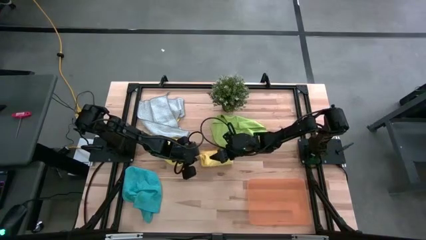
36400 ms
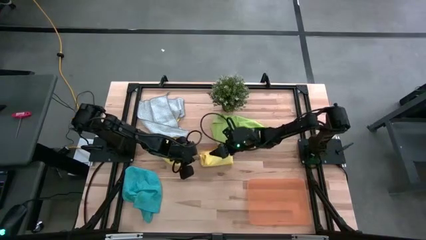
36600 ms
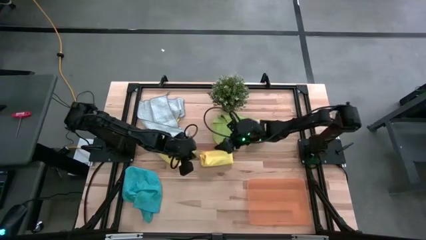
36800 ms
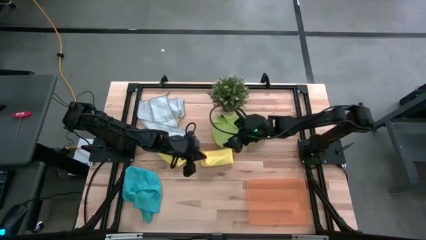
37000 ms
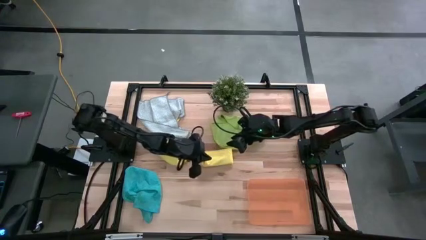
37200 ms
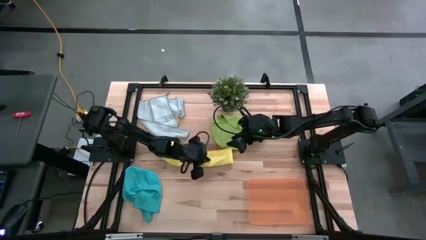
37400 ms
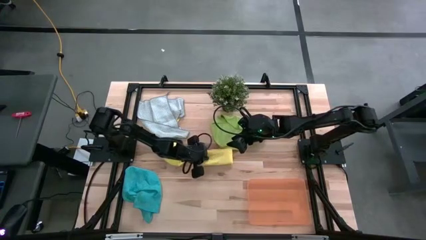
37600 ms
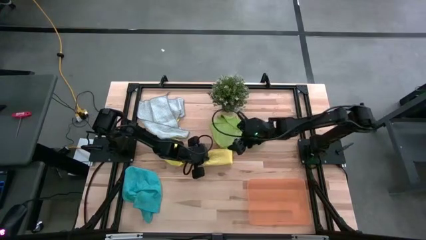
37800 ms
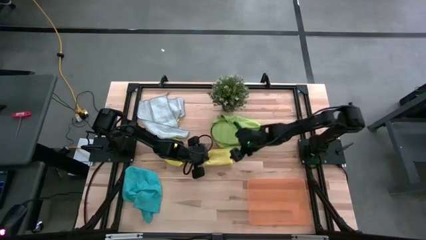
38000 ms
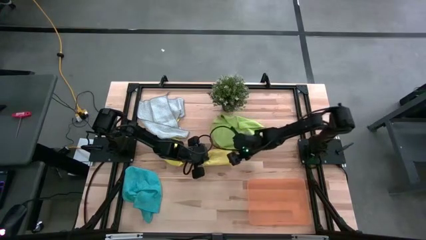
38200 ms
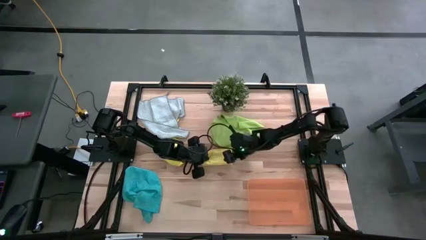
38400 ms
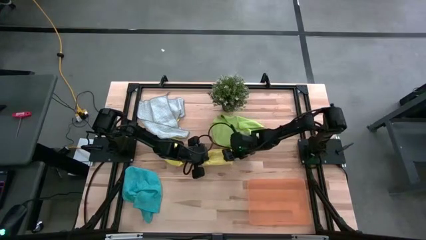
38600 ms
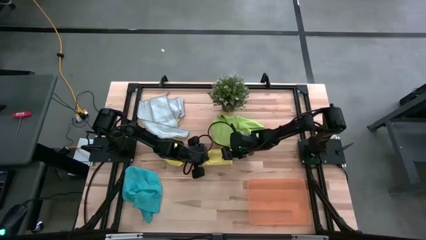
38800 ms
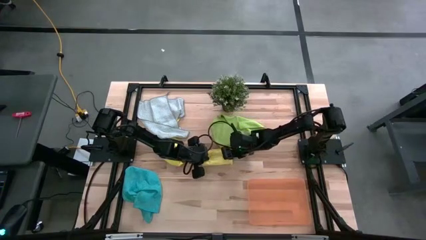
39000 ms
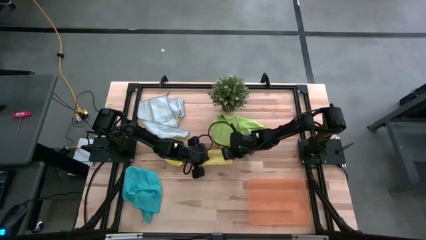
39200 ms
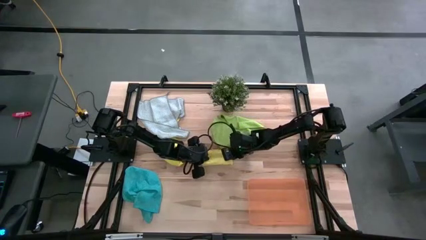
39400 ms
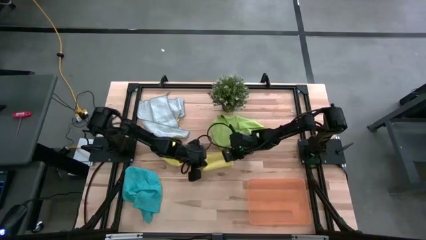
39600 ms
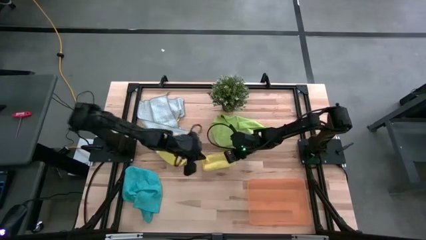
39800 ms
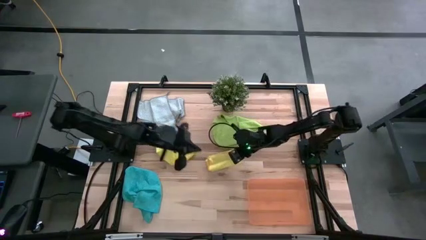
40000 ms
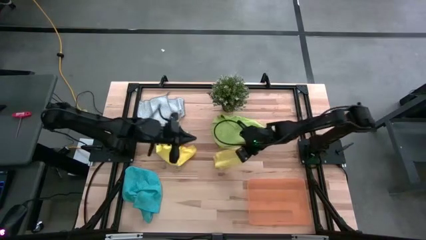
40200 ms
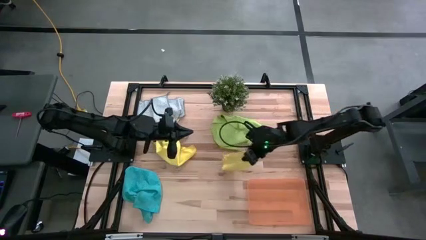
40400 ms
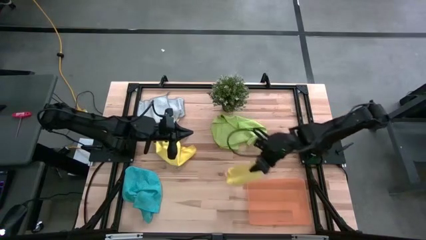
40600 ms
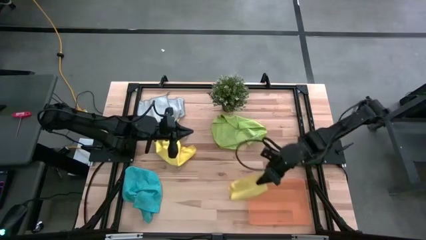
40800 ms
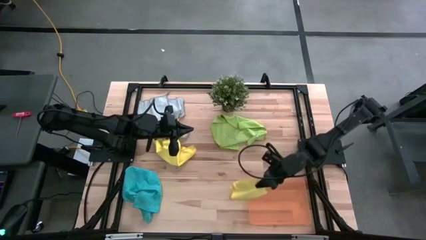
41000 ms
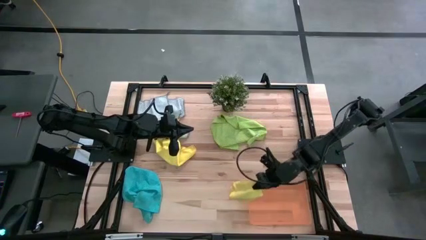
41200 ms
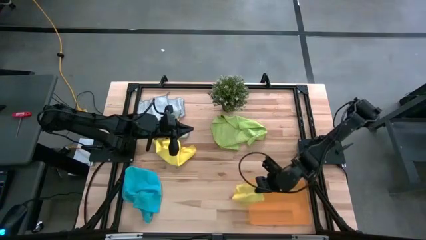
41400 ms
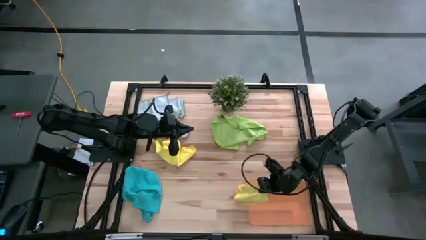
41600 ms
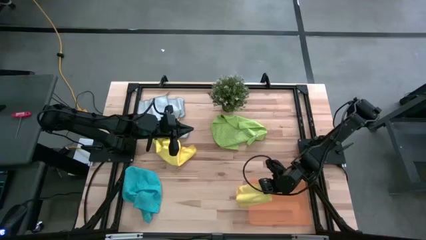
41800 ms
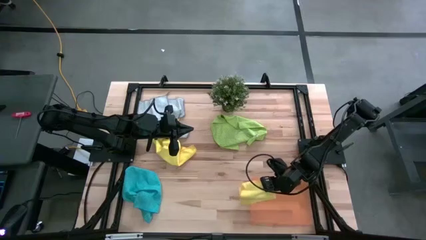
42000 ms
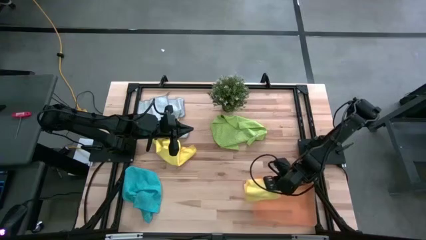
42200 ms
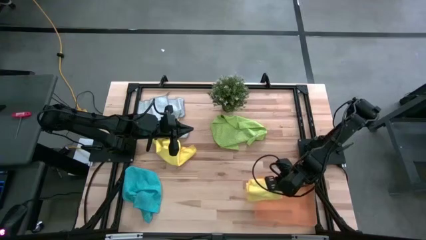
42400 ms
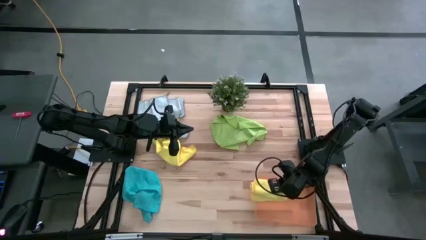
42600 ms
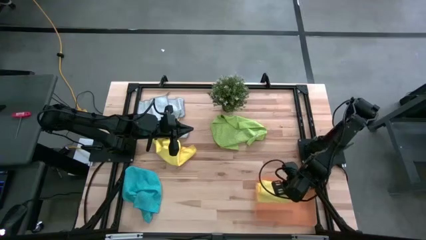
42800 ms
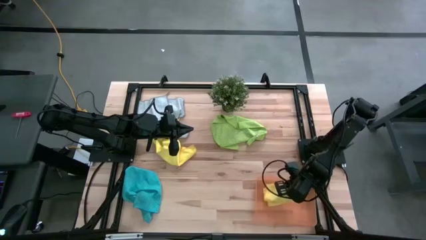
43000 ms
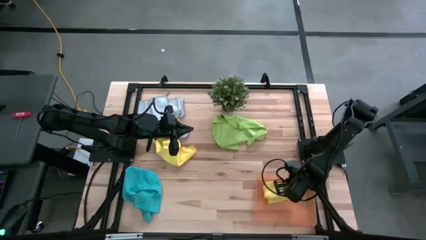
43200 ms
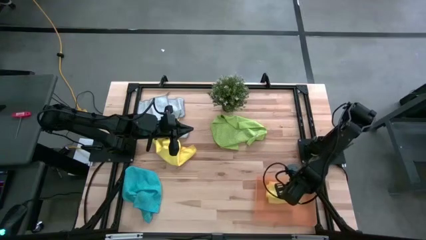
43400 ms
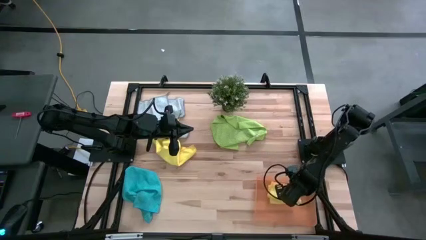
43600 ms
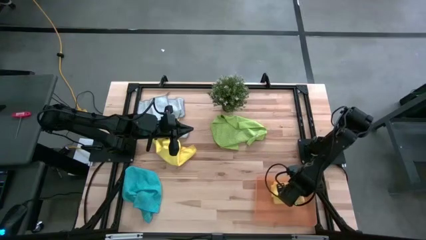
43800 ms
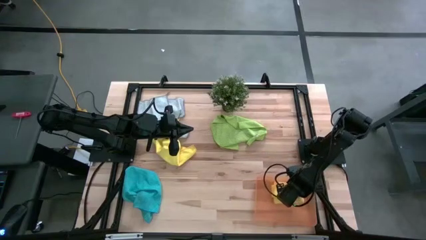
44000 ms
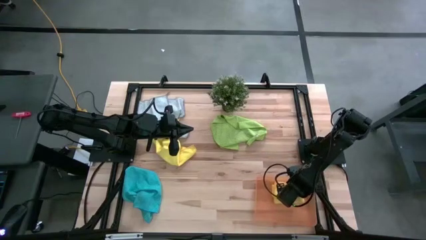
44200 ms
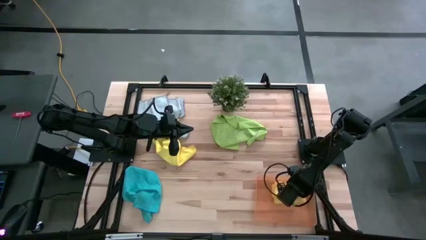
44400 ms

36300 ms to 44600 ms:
Task: Fold microfiber towels
Put the folded right yellow microfiber towel into the orange bin

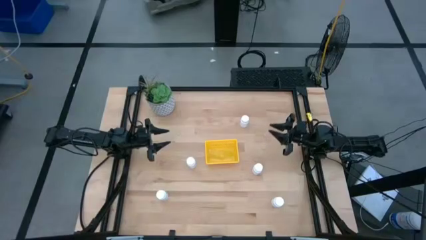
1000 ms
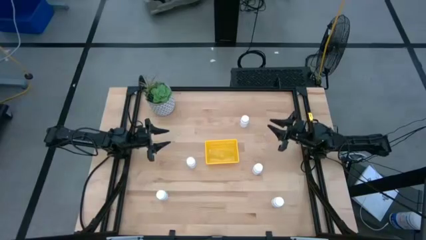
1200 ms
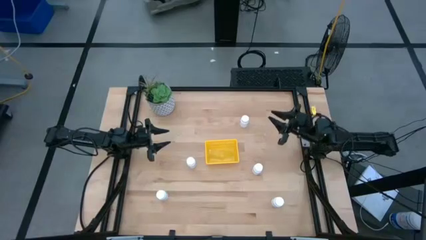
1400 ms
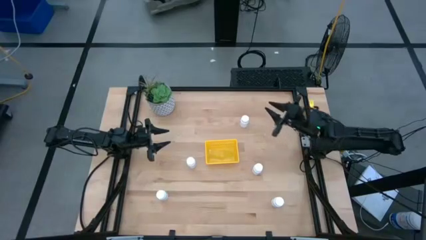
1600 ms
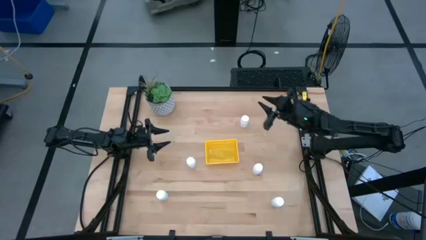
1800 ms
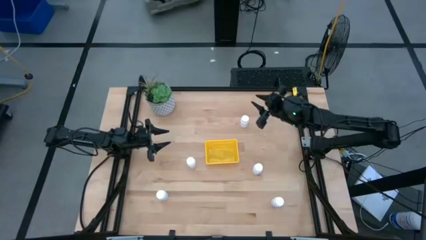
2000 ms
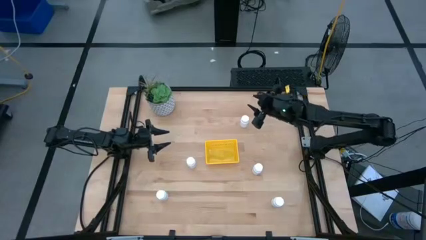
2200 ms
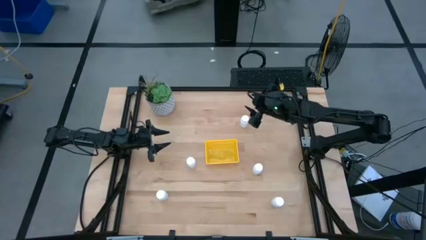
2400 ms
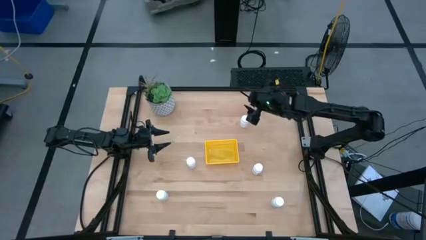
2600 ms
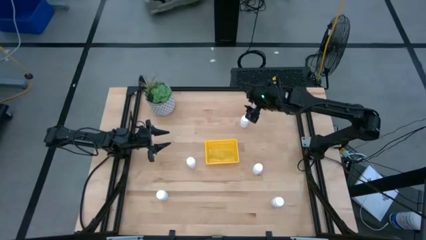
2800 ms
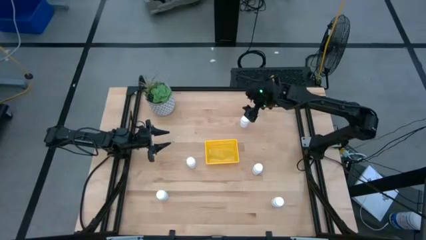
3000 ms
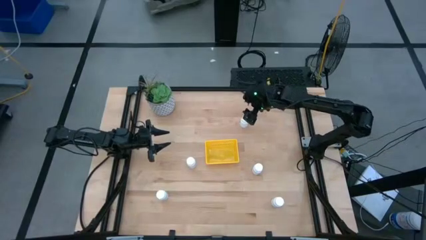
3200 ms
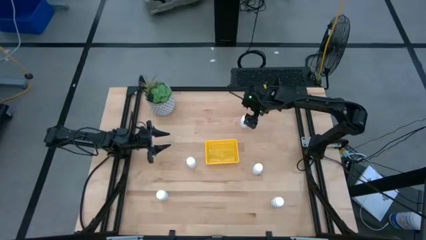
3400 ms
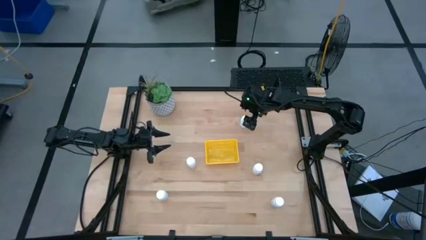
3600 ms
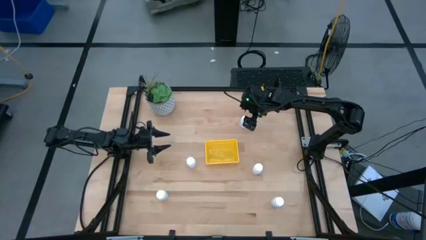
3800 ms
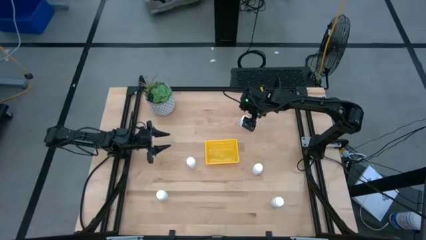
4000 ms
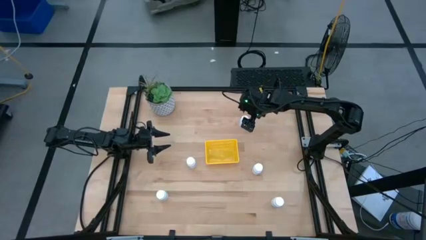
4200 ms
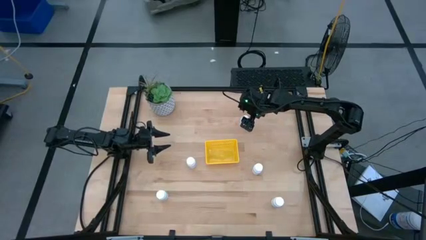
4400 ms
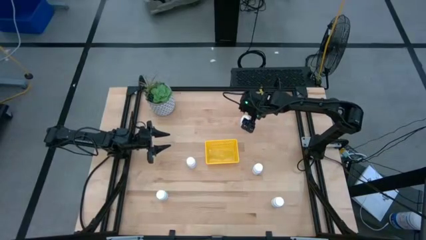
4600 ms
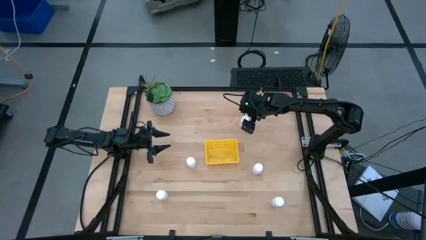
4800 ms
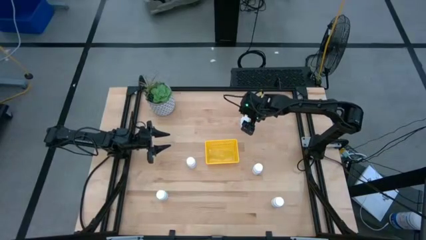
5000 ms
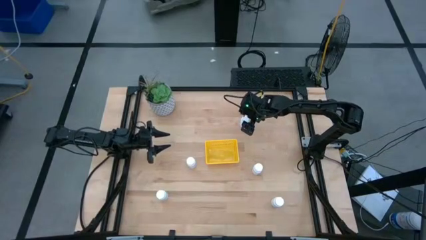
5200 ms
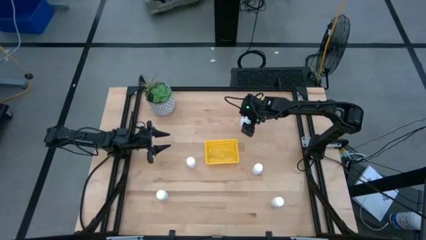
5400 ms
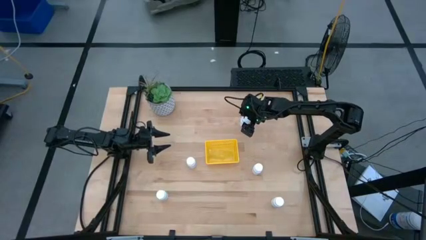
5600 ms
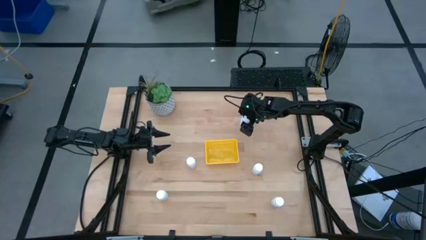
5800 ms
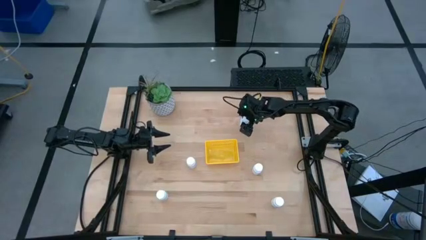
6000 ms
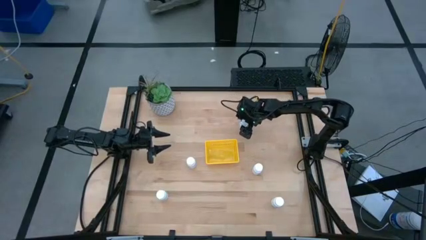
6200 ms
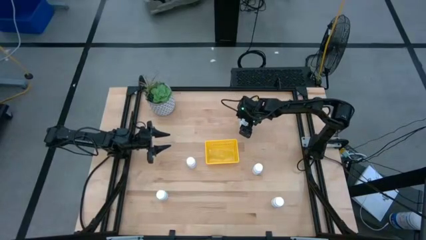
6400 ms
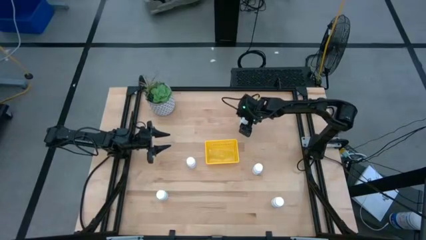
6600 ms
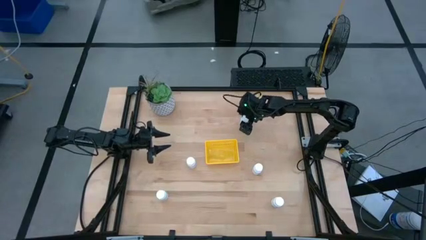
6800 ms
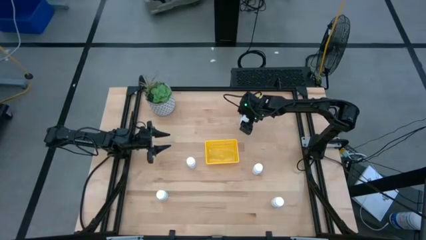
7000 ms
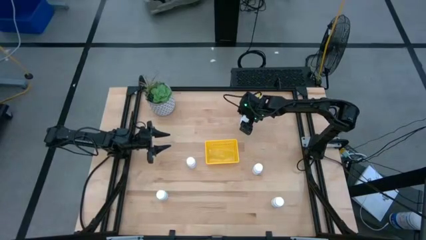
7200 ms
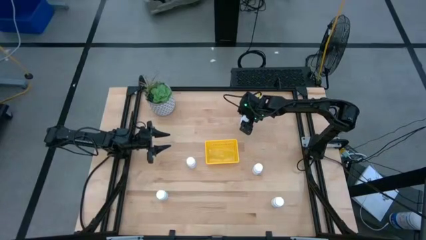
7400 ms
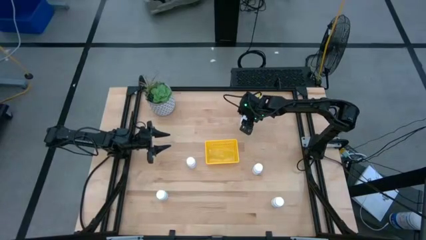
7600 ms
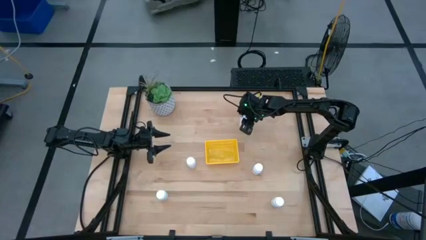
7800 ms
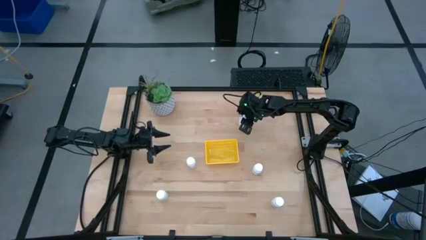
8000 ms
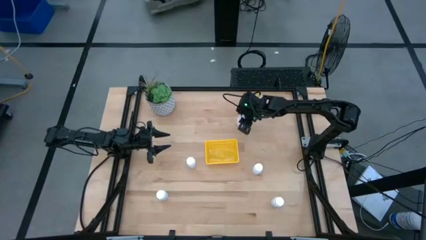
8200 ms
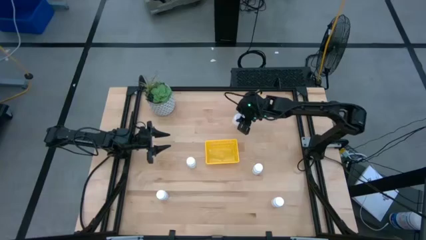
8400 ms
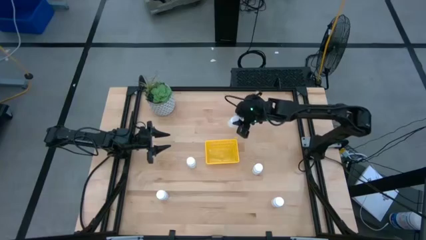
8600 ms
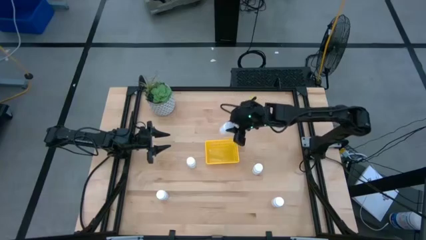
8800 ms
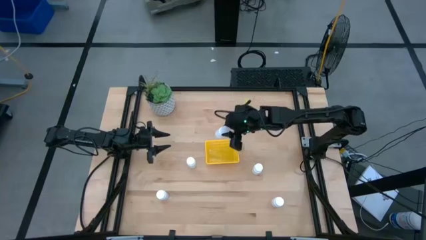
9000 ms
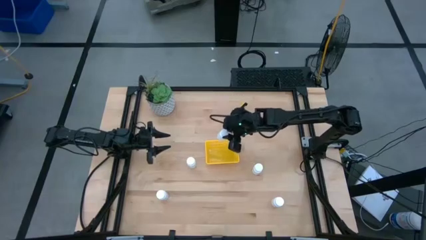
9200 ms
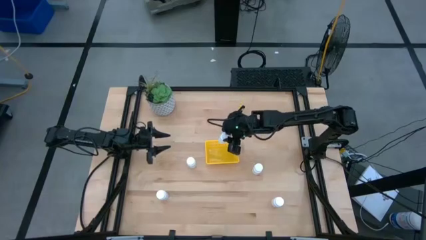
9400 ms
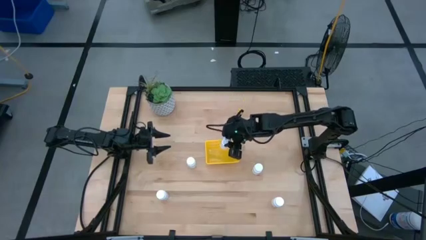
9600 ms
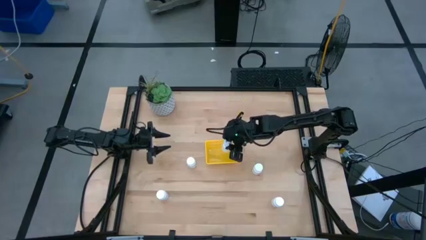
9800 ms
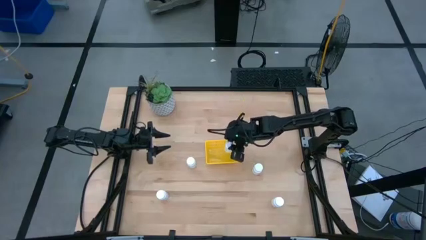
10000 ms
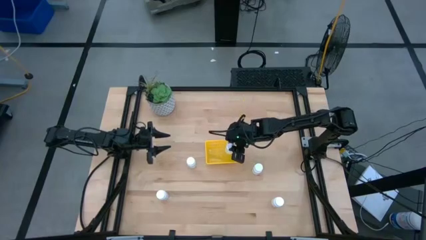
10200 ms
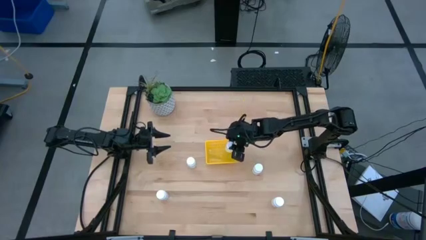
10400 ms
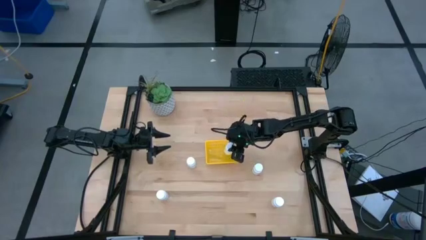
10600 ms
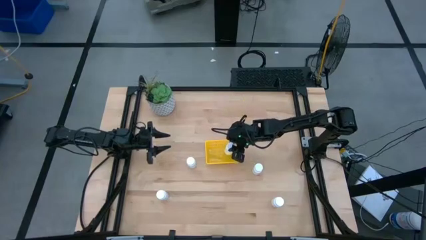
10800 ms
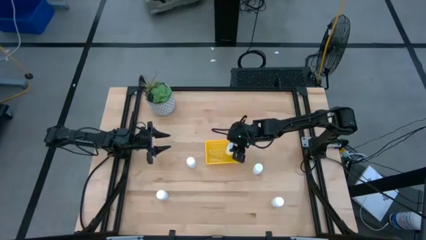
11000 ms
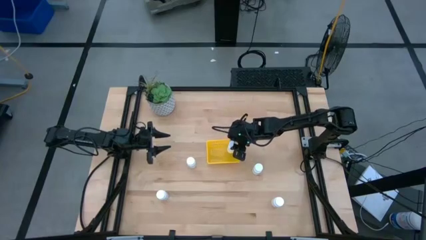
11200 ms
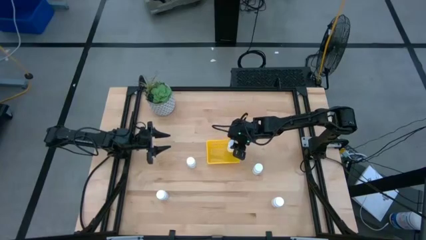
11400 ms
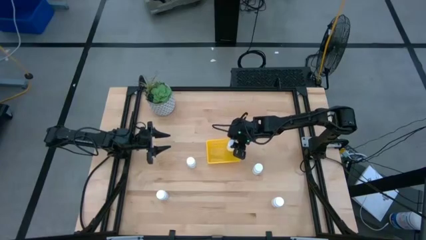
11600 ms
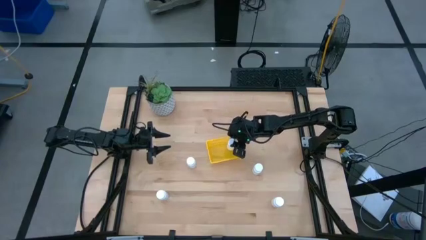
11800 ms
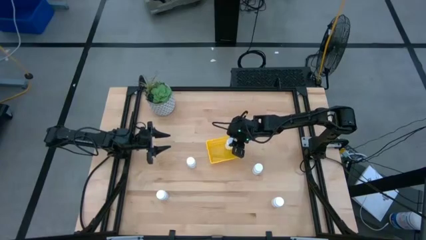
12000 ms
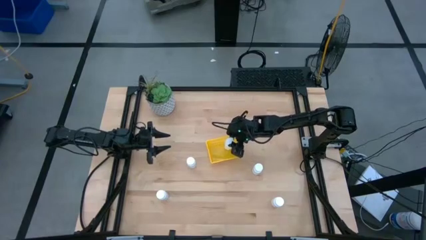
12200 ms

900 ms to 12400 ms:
Task: Pick and place pill bottles into a basket
Put the white medicine bottle into the yellow bin
